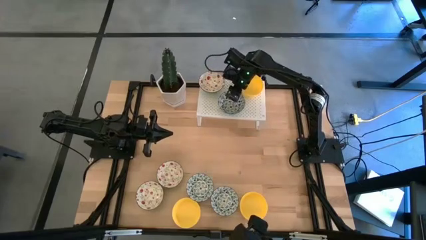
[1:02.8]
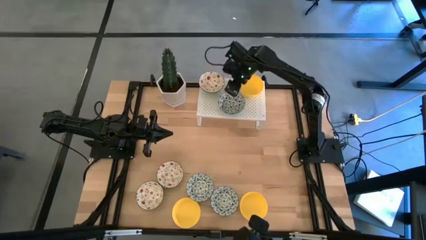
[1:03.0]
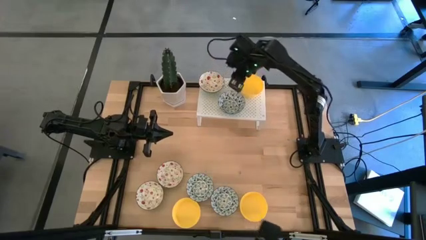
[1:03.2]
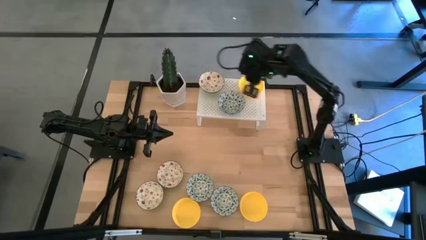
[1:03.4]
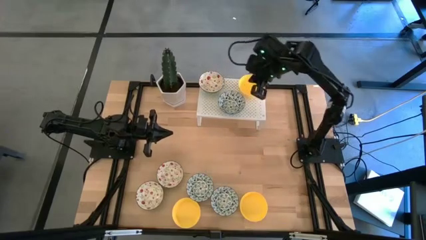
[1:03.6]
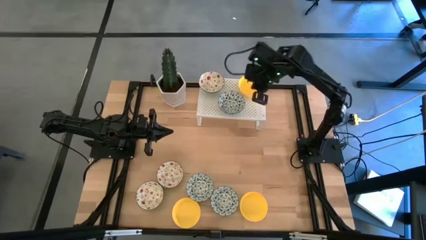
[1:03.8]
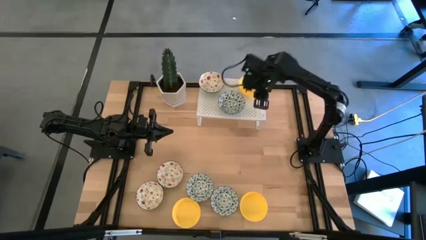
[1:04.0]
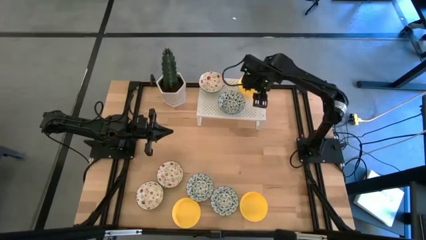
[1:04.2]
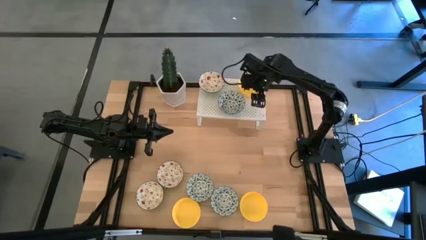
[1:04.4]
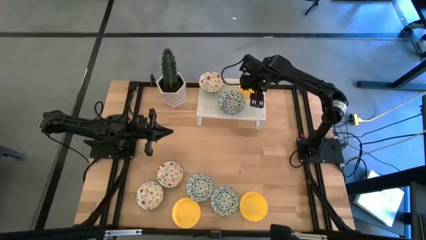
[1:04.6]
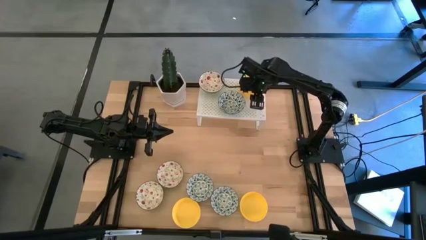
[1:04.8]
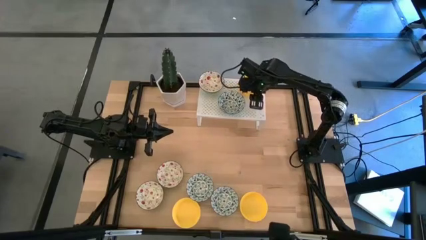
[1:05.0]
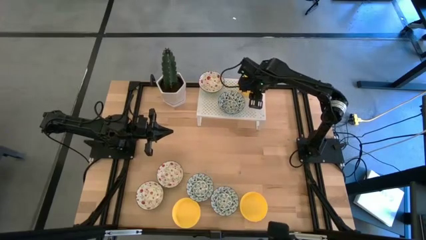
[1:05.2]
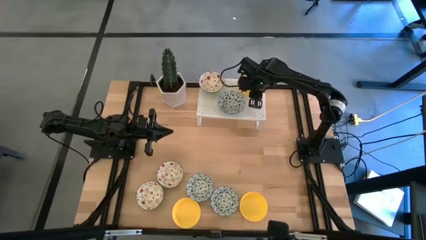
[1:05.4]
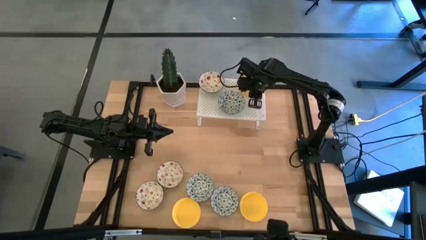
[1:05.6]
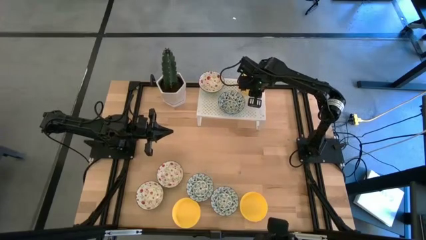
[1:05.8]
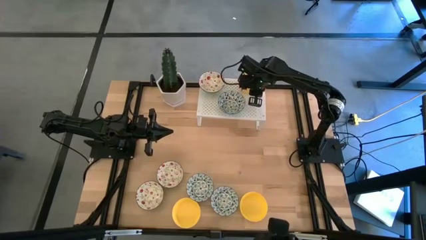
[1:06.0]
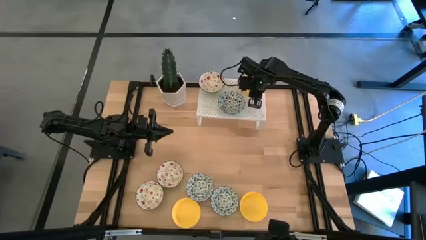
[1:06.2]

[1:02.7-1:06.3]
Task: Pick & Place Mini bowls
Adjust the yellow bowl on the shelf

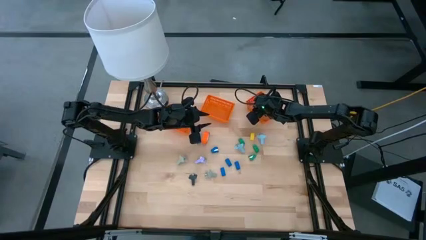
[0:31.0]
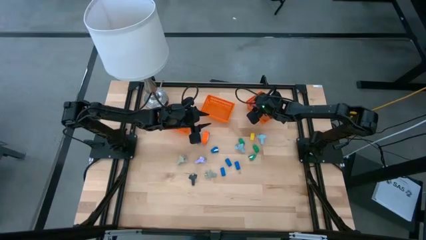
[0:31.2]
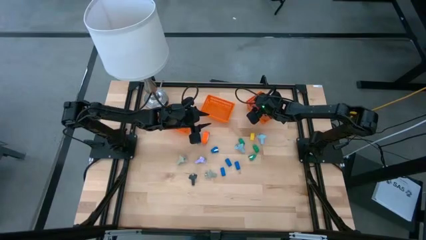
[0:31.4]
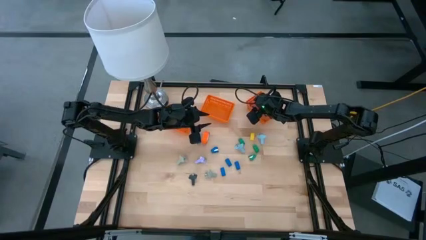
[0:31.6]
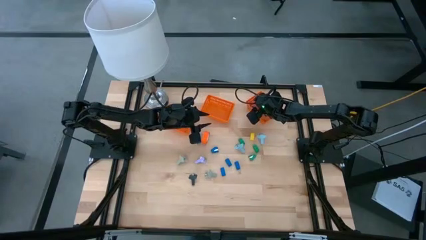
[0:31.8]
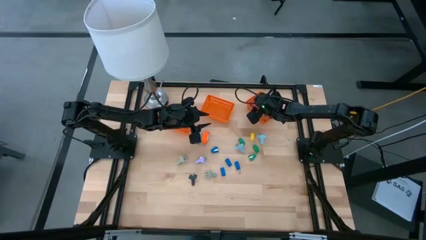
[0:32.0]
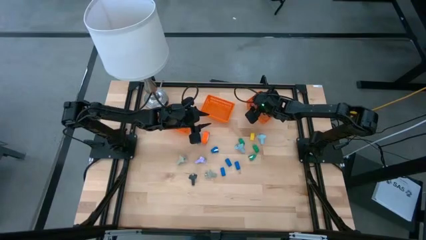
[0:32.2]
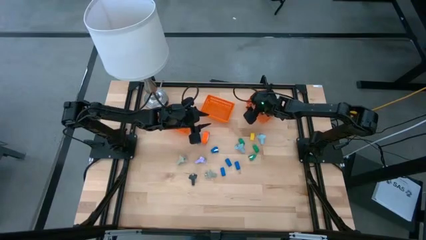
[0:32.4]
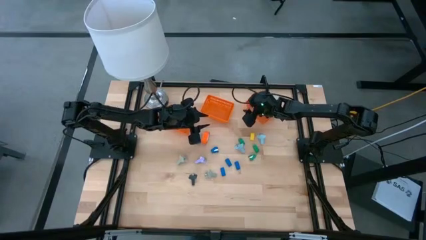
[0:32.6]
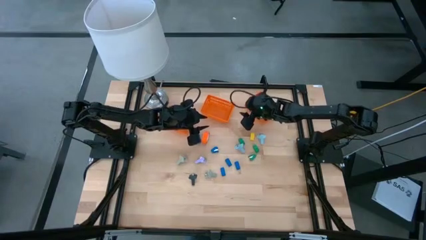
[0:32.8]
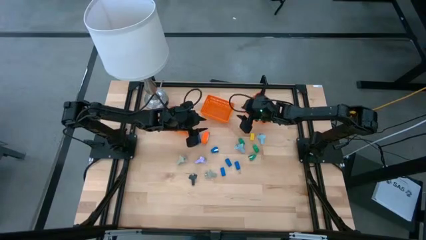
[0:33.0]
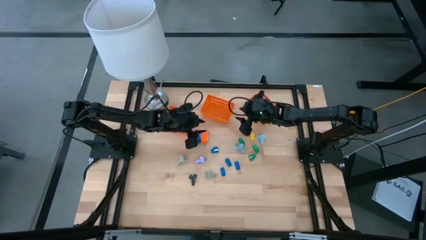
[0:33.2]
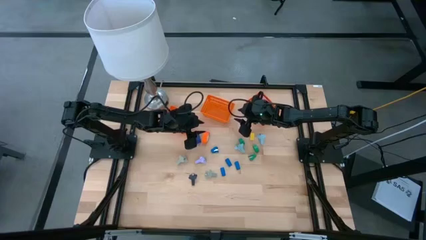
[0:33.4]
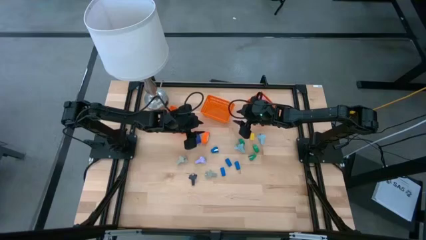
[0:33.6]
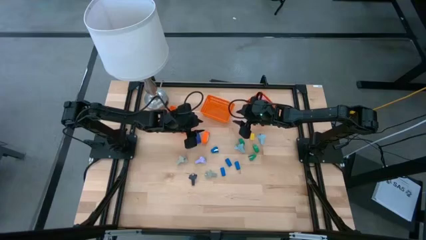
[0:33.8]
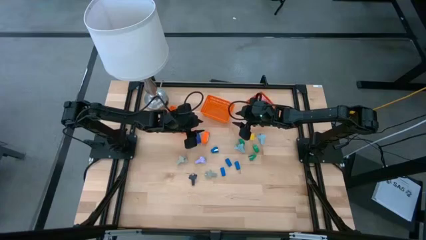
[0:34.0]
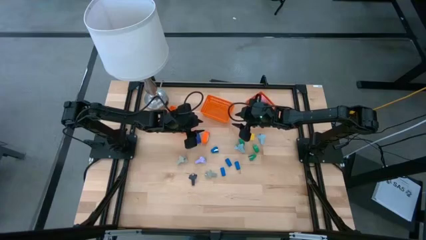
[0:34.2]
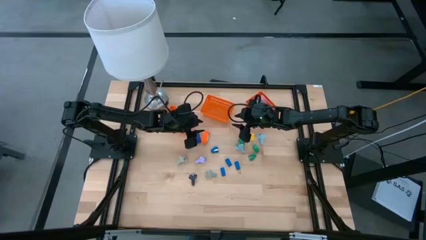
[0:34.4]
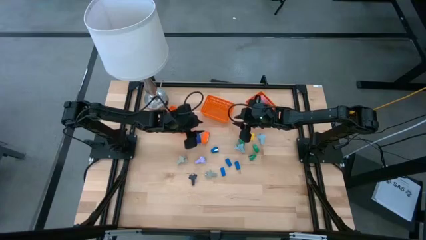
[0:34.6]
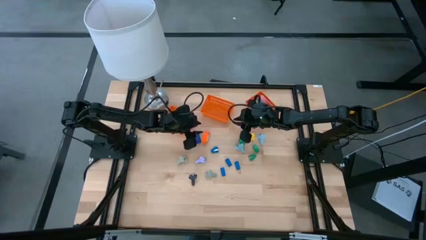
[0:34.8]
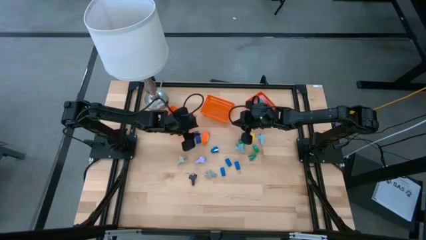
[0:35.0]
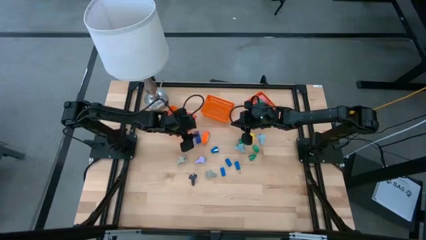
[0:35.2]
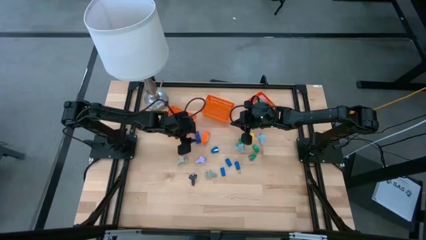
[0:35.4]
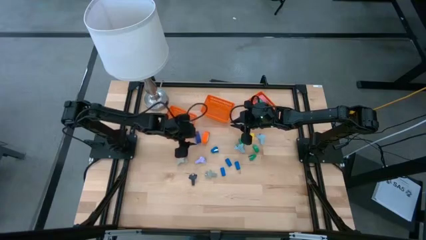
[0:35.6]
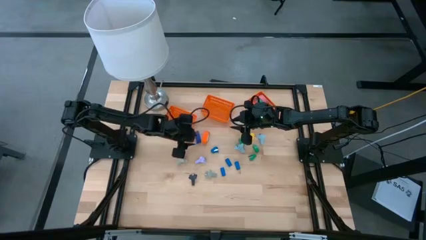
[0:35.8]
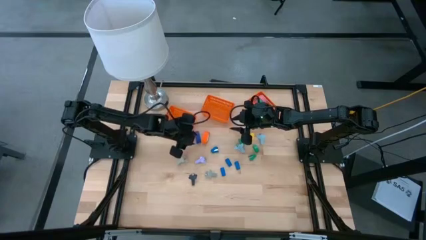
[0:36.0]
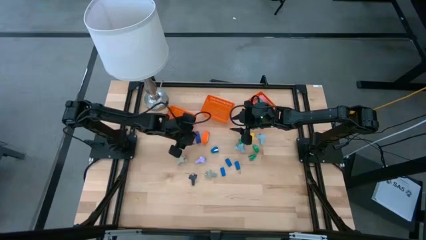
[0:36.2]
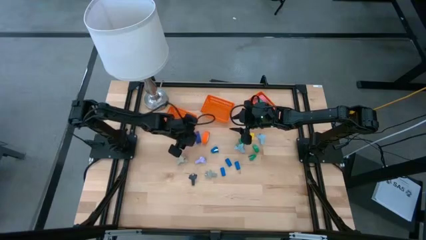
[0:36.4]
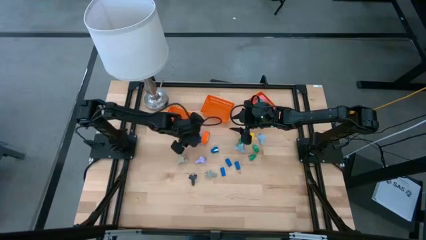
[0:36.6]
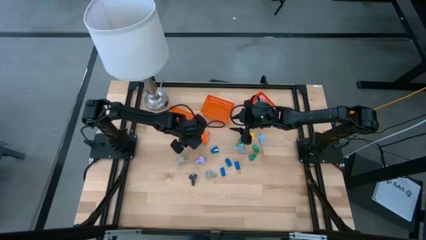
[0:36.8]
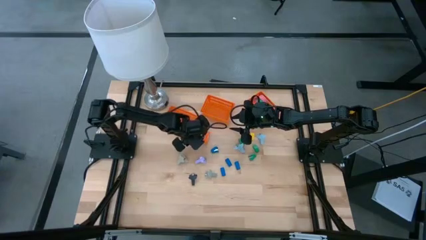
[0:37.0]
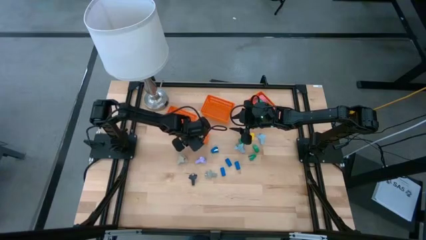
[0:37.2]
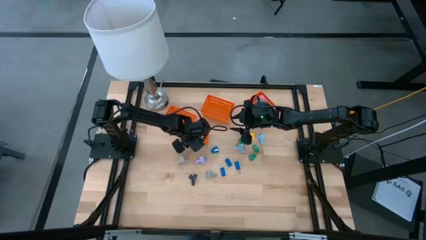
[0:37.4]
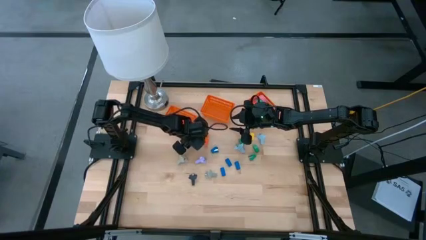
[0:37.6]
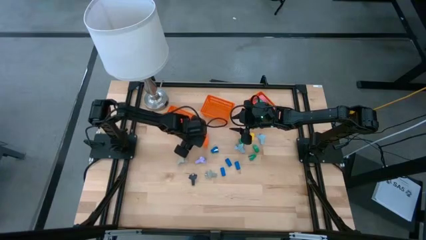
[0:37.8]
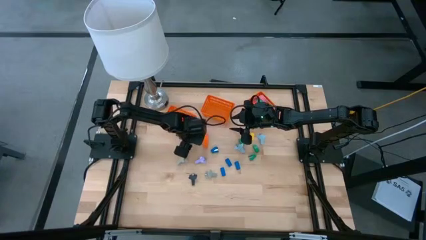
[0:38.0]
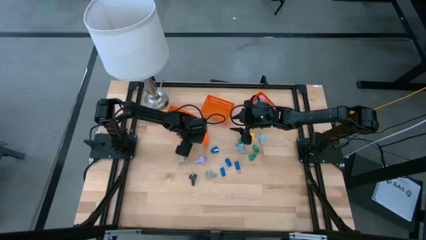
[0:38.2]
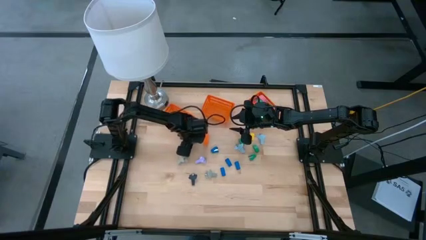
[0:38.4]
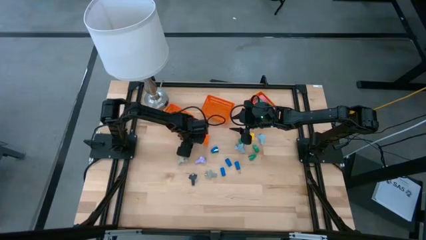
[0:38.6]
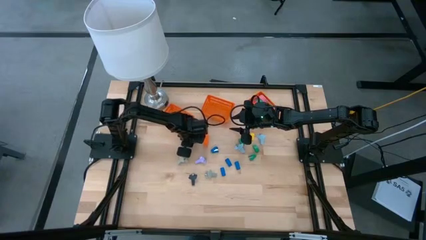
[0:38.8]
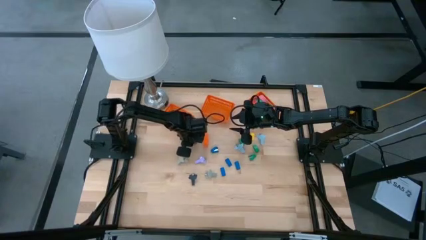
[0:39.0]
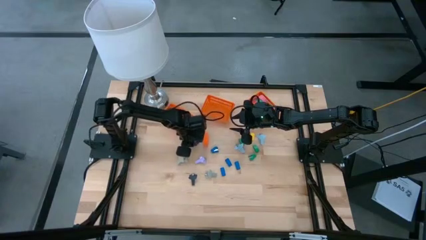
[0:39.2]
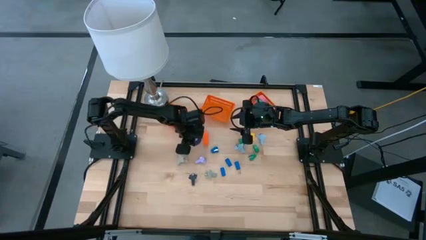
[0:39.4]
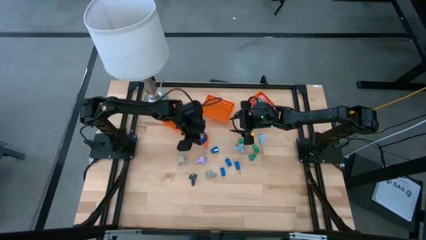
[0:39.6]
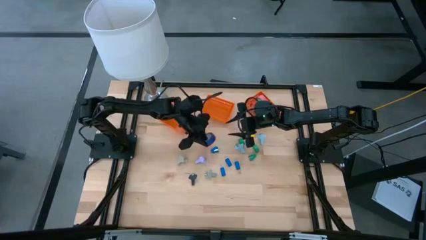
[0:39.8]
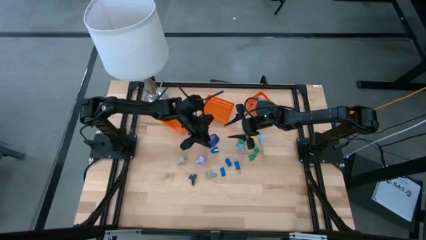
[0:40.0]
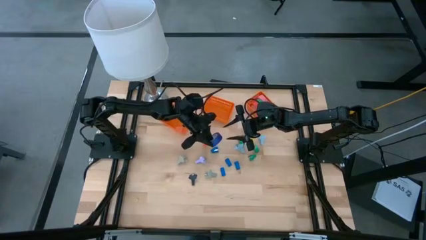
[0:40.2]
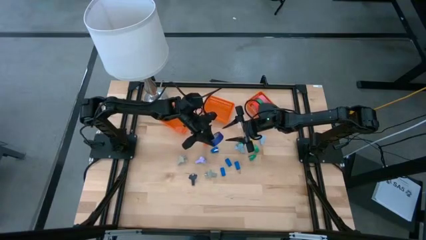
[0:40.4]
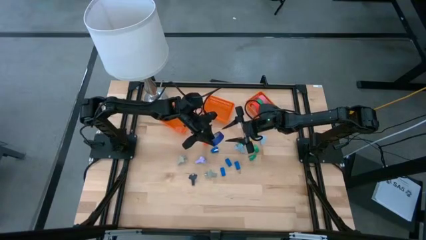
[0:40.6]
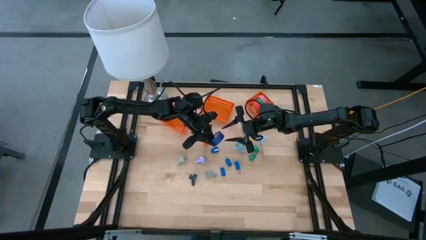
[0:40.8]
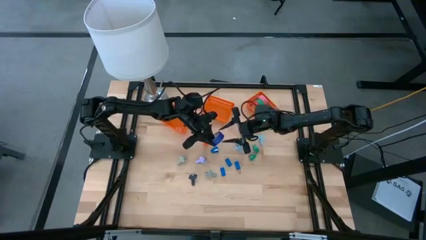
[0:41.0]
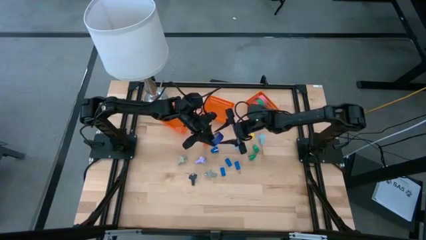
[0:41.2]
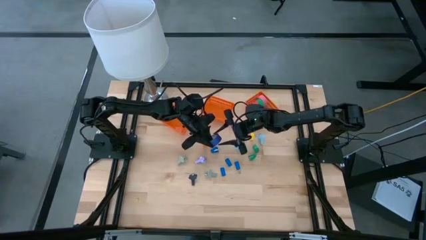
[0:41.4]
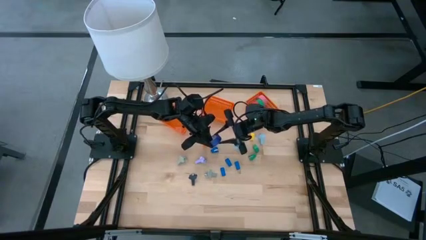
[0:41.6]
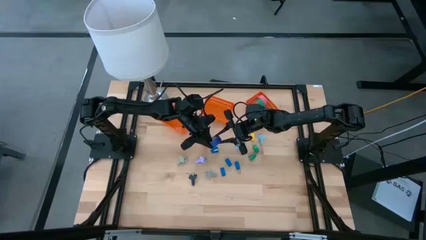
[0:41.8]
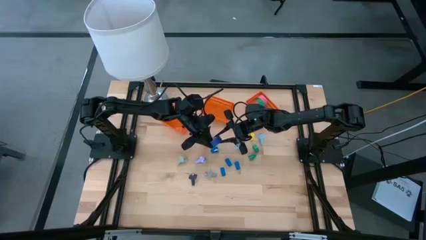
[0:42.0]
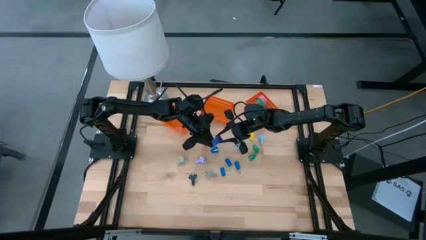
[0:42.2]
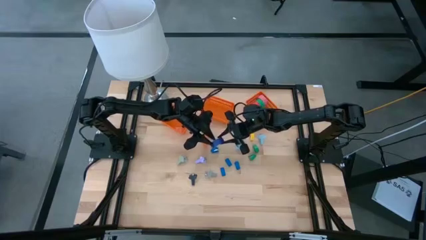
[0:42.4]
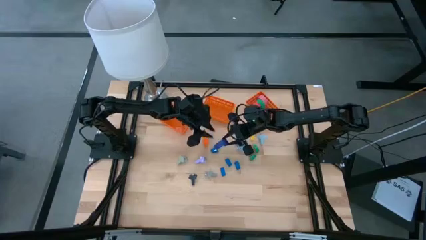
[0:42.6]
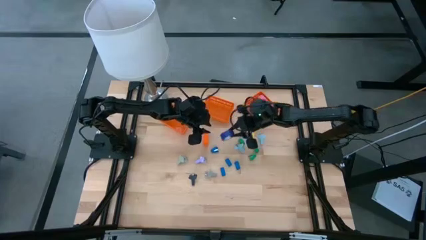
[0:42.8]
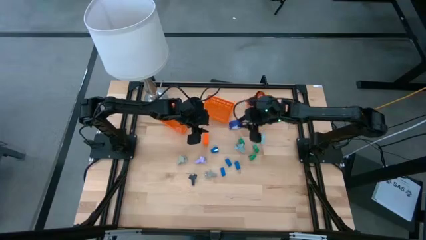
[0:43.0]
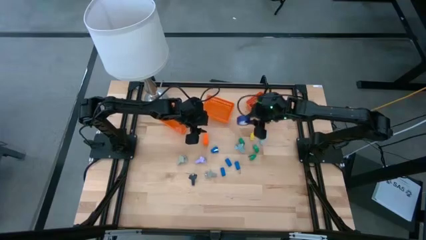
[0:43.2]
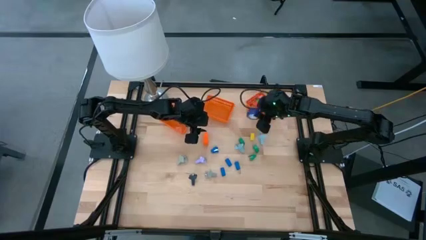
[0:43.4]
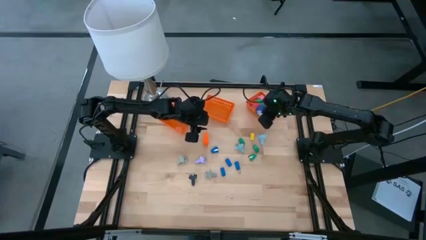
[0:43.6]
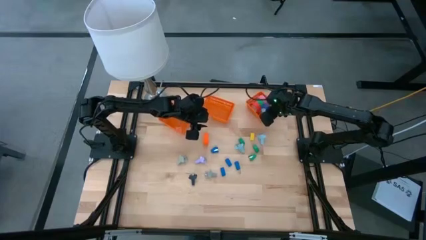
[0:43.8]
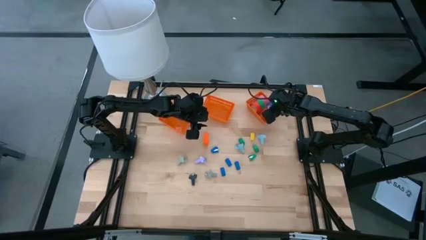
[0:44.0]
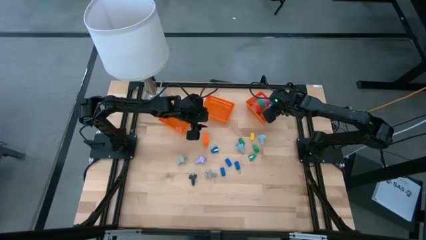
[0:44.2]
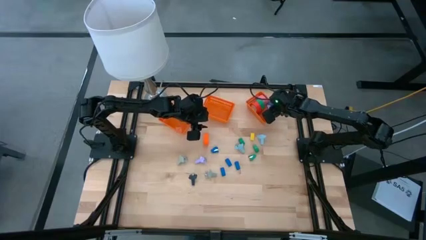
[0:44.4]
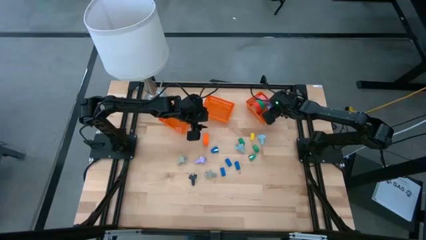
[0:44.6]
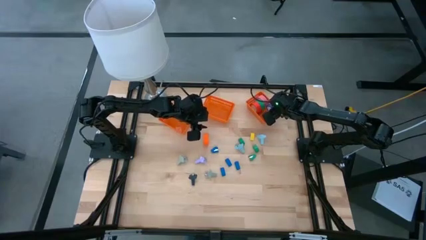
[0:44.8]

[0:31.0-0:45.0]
Task: Pick and place Stapler, Stapler remover, tape
Put the blue tape into the right orange bin
